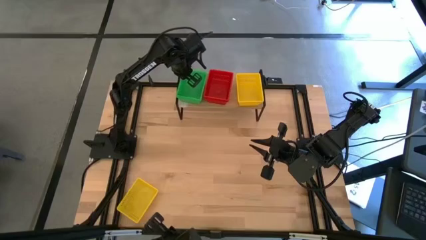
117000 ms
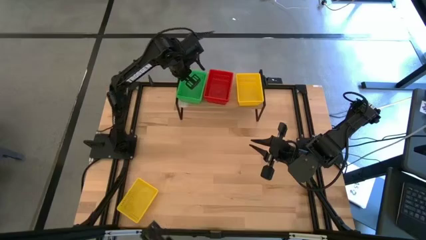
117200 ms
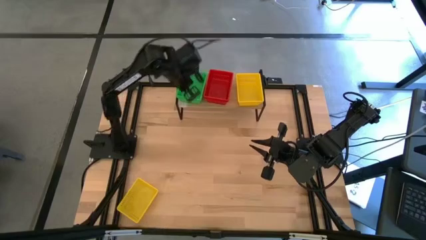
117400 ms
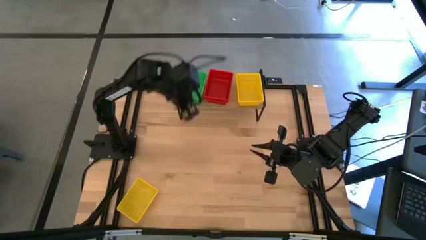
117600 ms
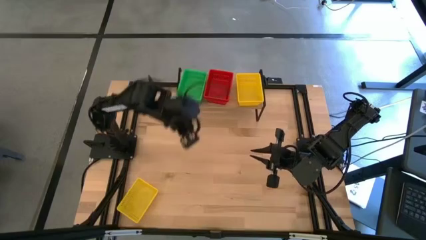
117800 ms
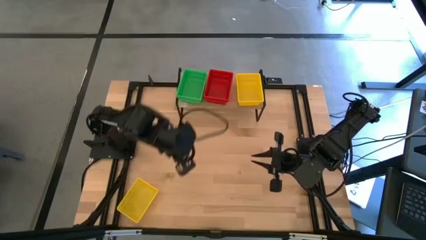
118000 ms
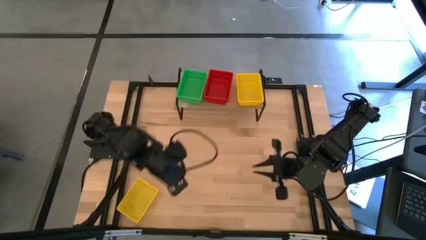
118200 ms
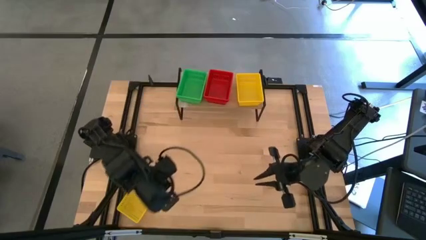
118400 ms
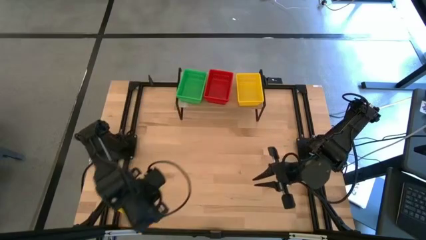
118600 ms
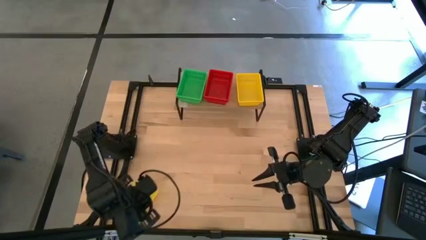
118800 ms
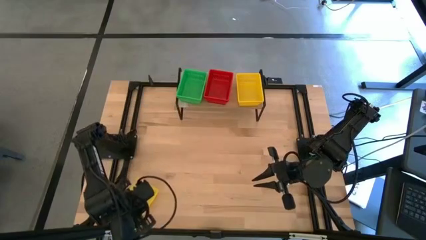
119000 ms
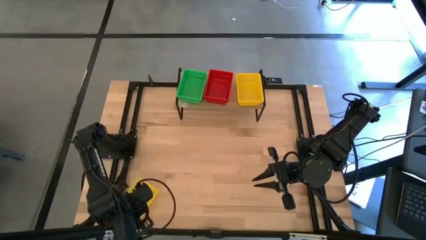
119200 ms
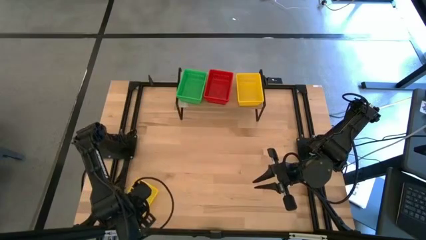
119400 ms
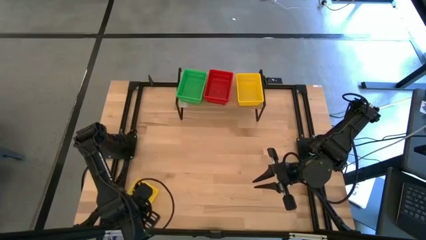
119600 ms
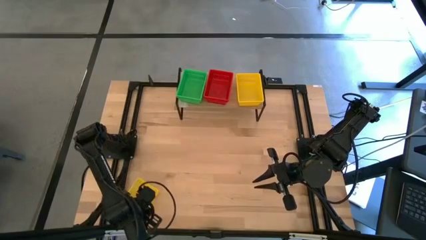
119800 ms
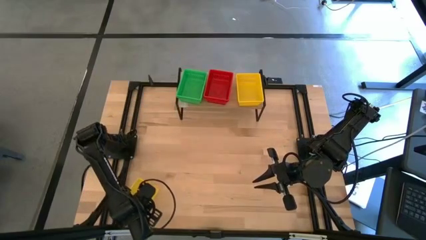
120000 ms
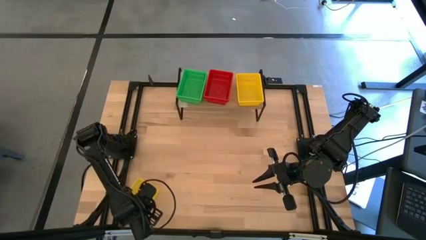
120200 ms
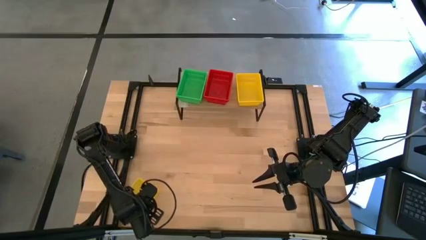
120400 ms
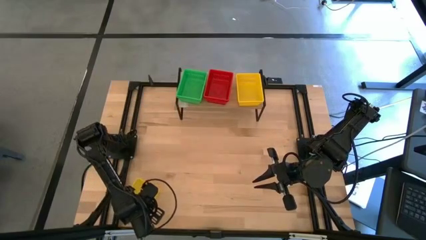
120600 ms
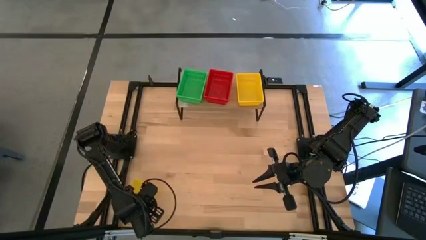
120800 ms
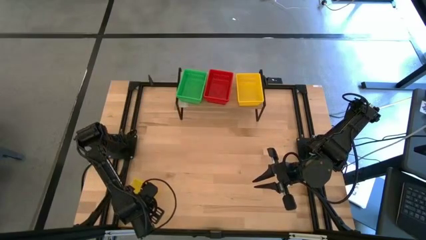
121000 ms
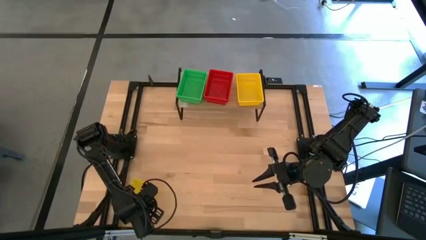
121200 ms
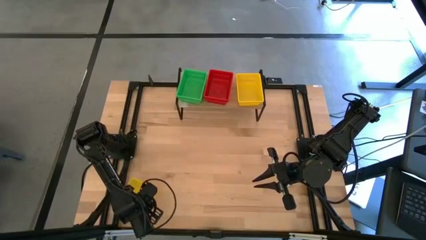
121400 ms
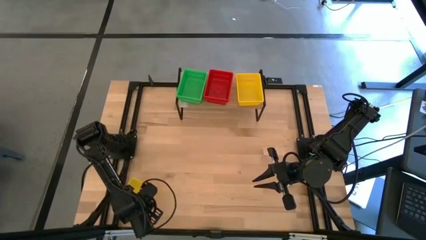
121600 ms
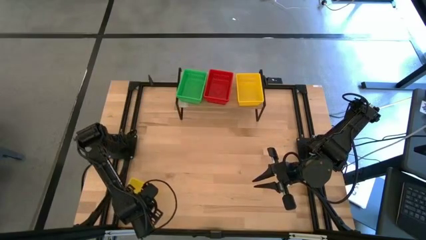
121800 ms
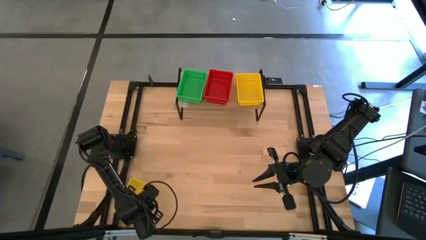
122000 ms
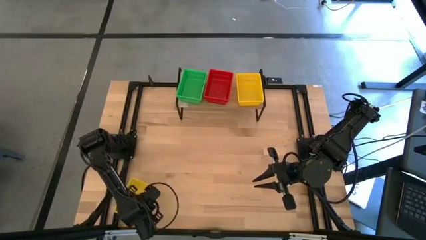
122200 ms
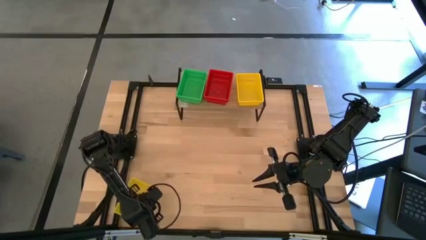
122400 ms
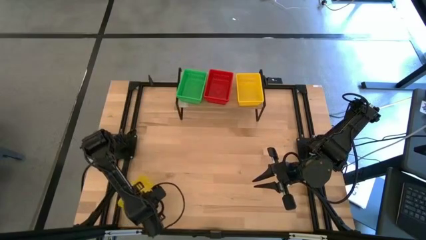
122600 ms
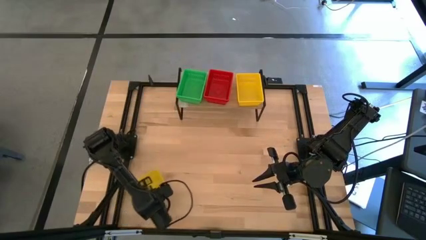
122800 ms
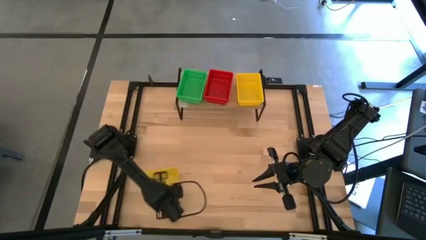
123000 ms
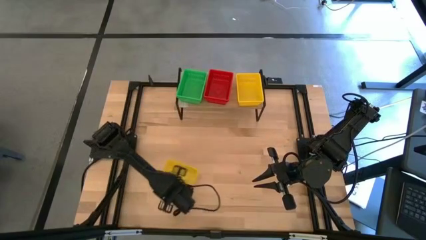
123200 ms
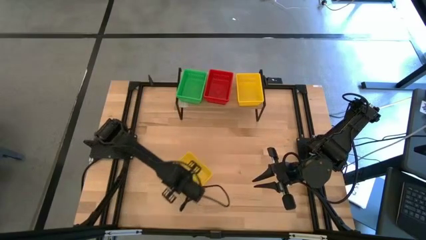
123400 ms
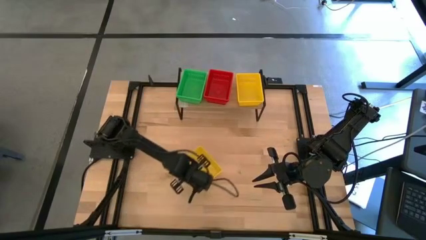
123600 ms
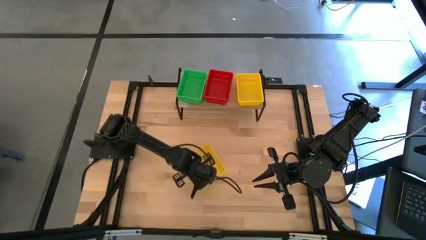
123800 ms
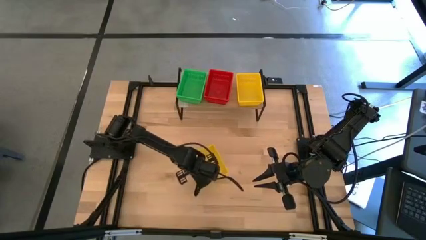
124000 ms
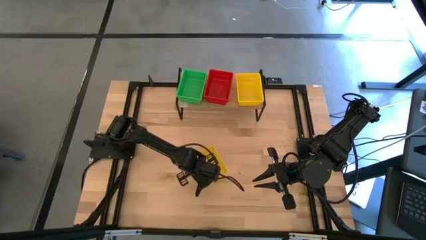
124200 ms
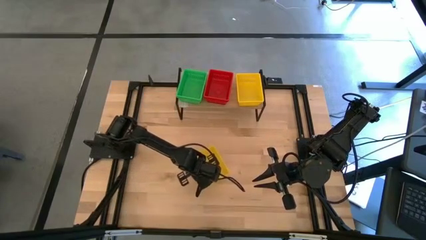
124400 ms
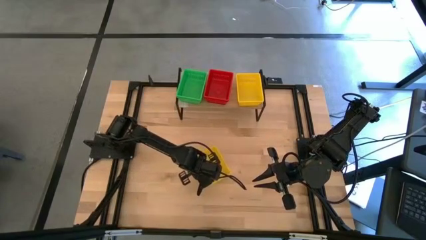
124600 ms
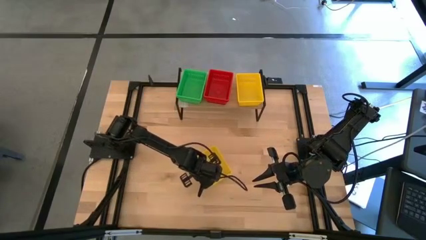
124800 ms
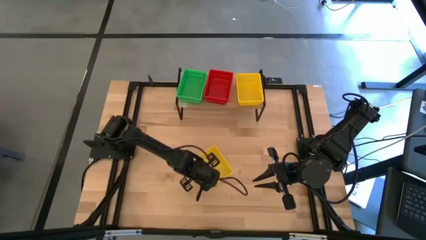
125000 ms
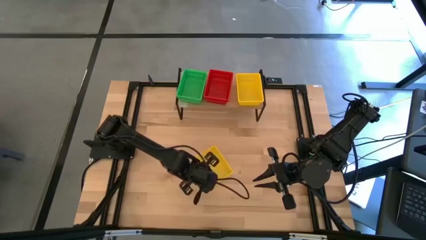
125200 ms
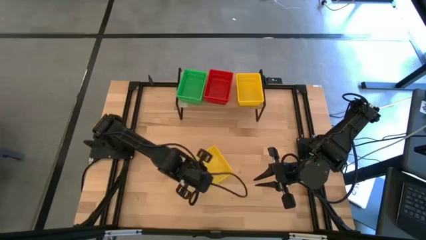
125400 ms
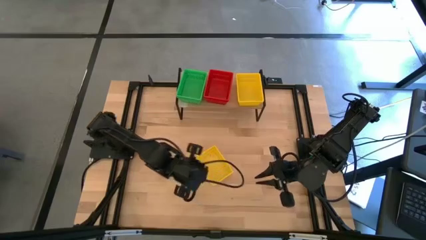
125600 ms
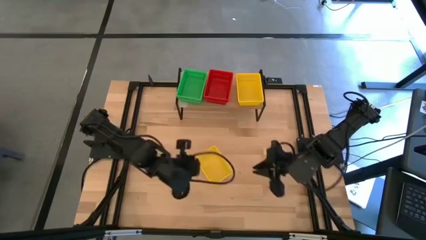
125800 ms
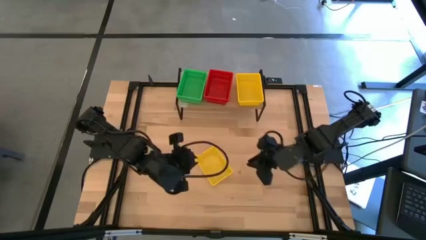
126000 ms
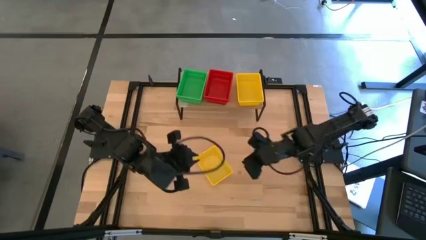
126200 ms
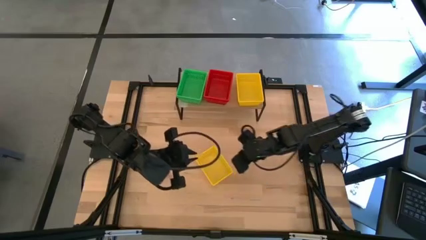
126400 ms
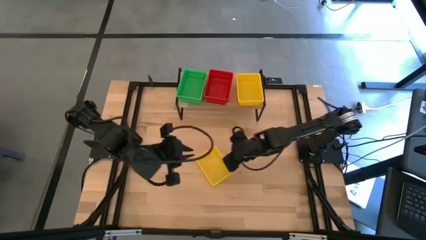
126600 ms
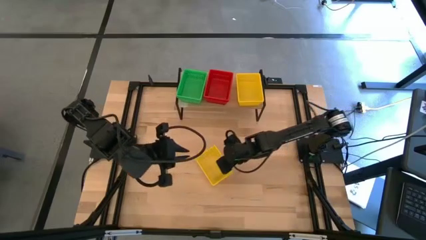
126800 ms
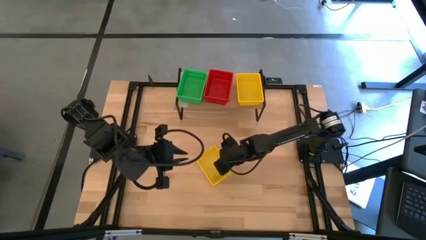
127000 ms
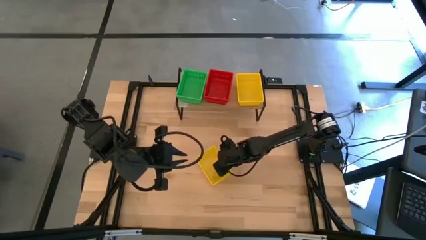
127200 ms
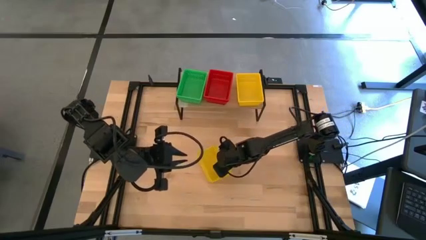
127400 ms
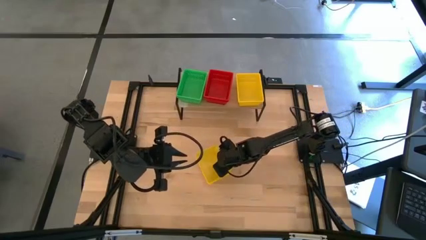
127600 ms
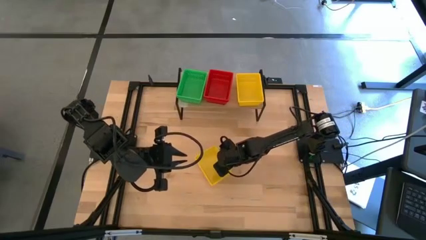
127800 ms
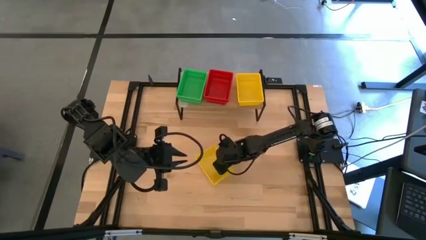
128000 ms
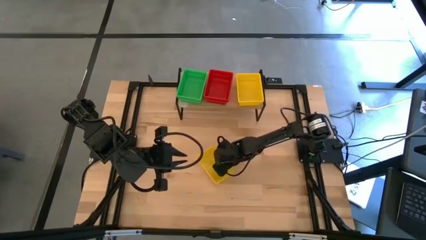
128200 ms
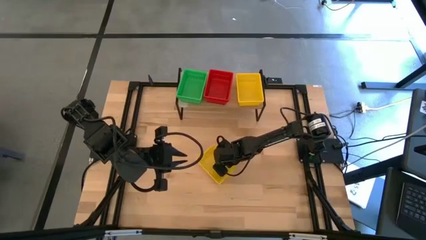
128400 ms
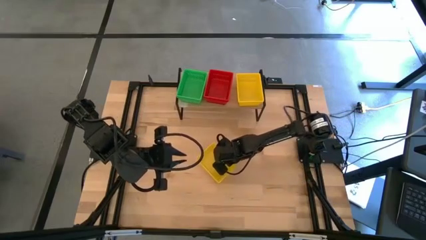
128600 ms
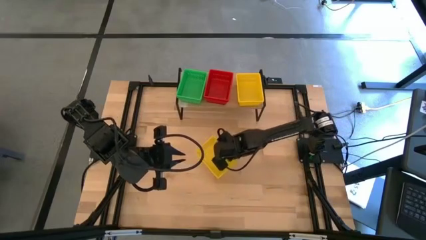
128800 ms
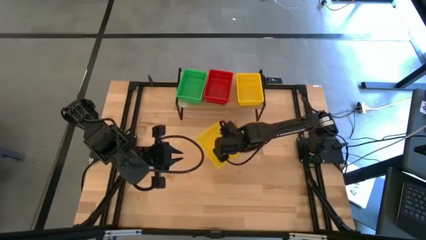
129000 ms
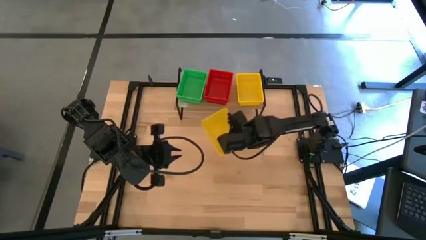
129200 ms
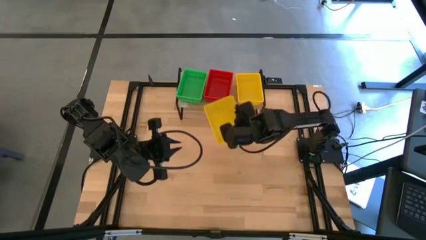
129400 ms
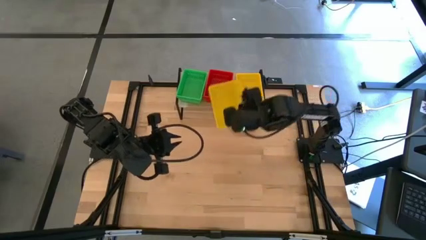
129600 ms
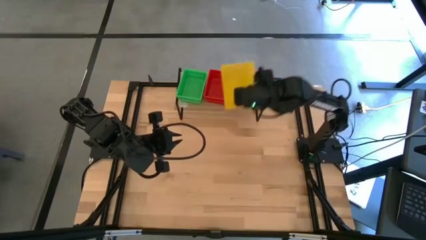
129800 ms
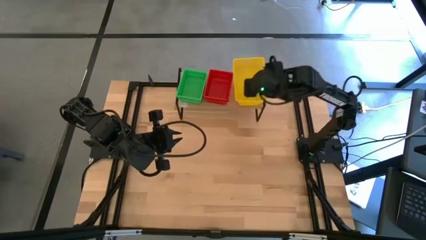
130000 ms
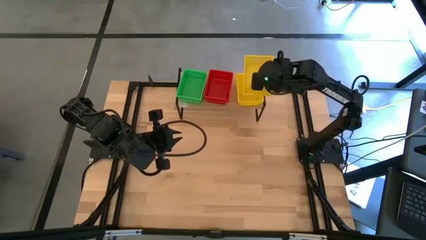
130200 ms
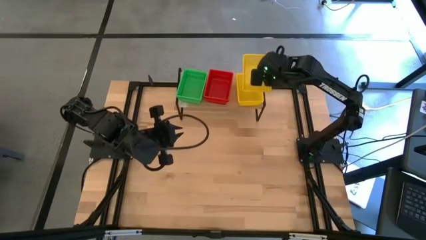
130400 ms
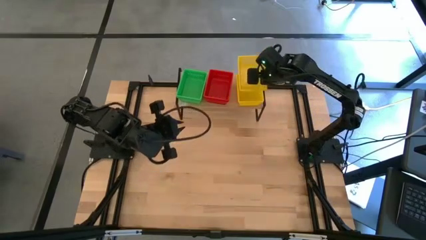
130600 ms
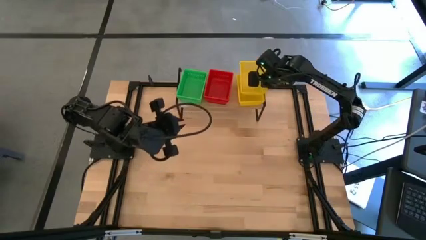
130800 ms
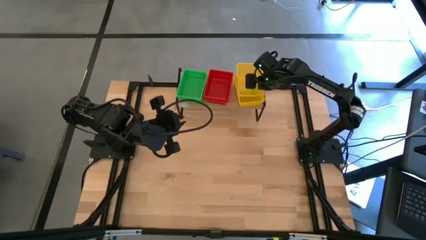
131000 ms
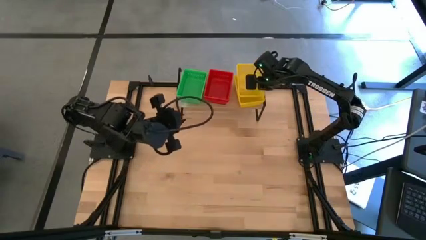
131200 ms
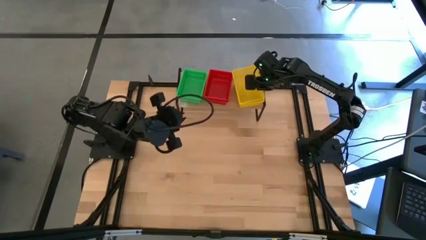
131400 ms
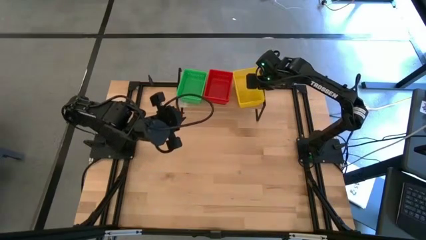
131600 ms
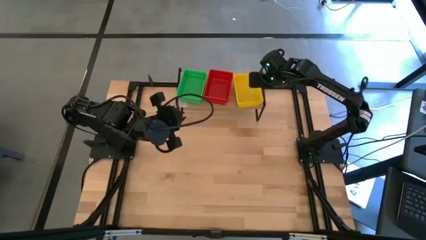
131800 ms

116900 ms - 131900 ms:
Task: Stack baskets on shelf by color
Stack the yellow bin on top of the yellow bins on the shelf

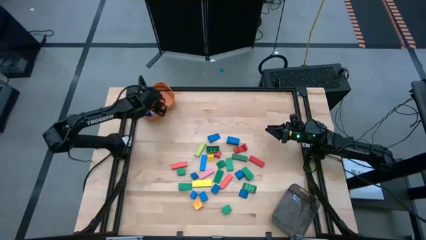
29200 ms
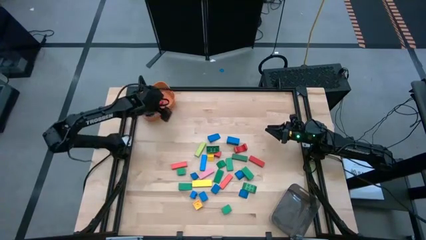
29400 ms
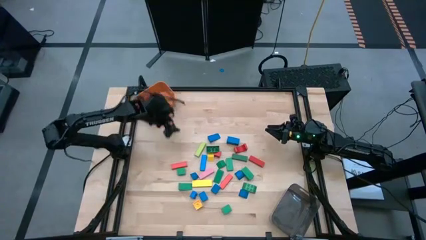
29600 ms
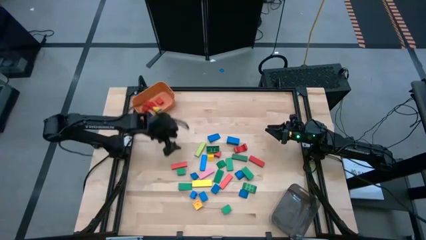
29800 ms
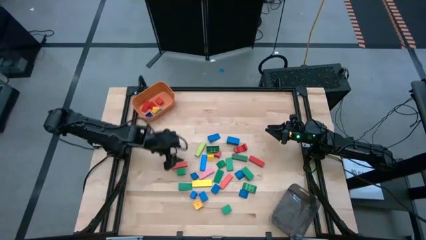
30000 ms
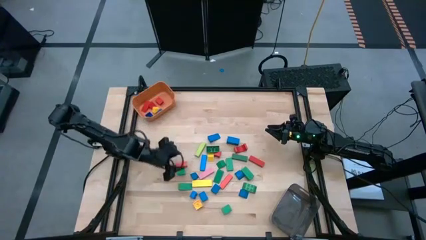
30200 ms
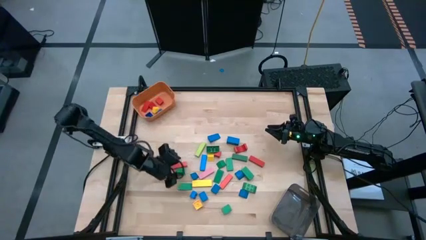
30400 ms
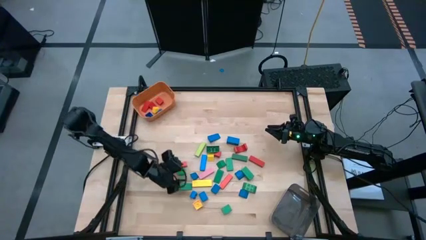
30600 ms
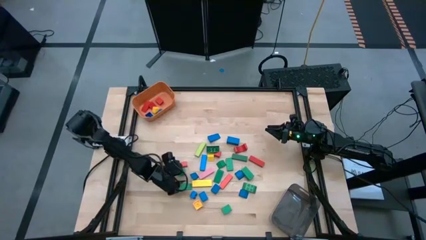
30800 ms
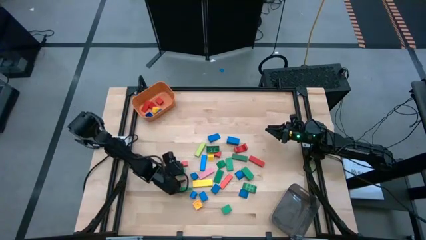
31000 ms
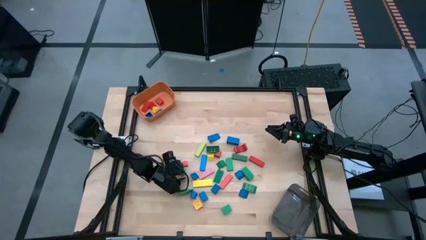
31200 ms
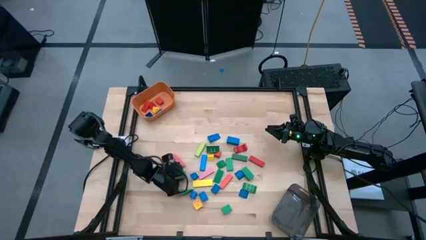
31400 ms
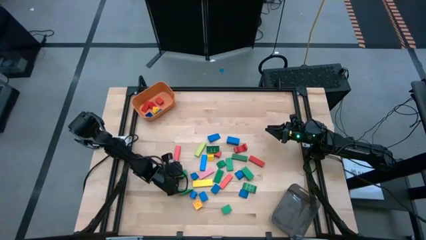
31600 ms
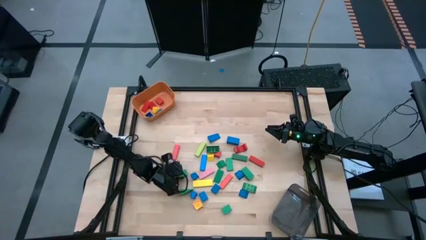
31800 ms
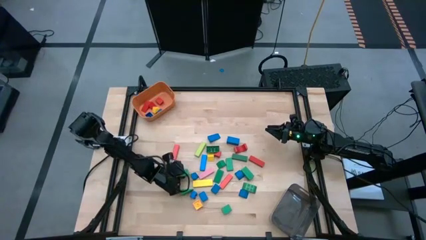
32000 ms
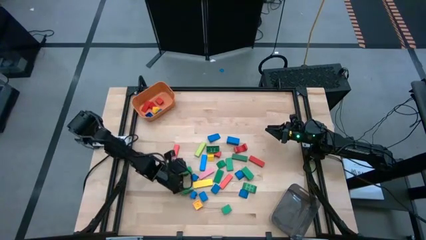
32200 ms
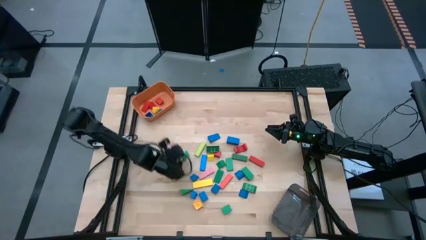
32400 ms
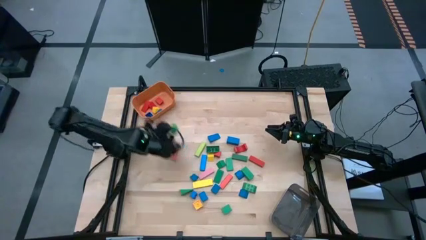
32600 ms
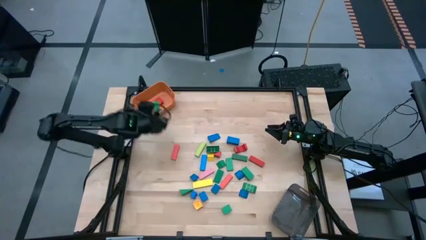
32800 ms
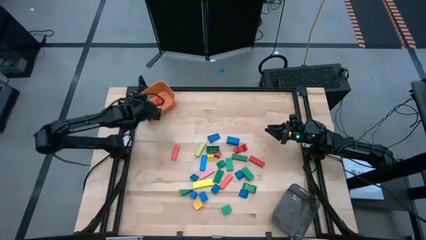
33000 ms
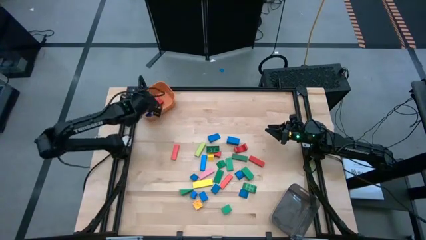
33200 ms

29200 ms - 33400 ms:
Task: Sort blocks by size
Put the small green block into the orange bin
